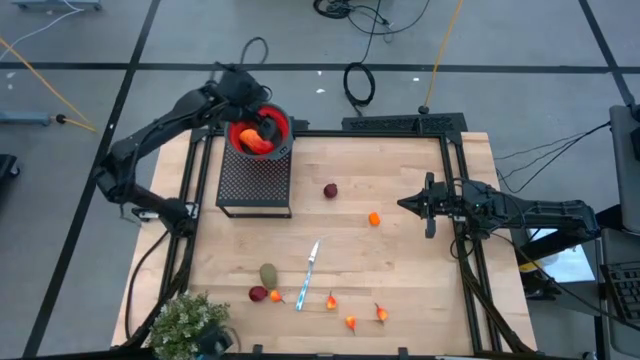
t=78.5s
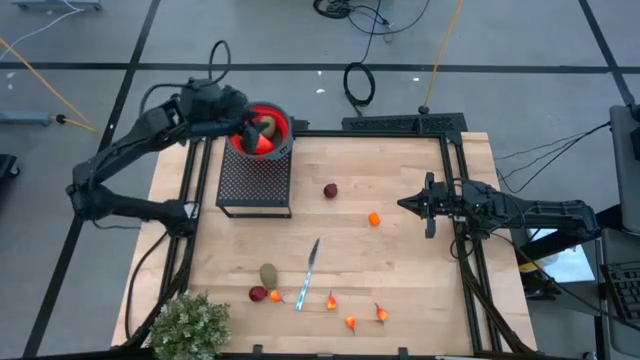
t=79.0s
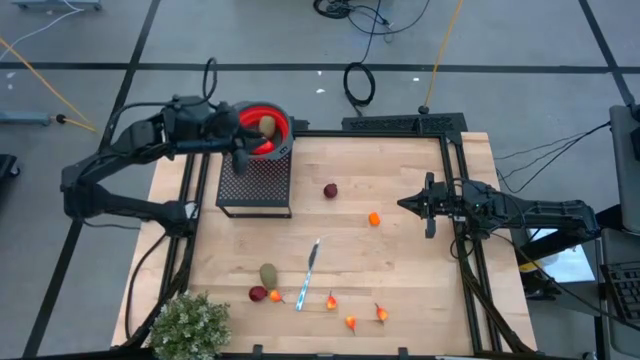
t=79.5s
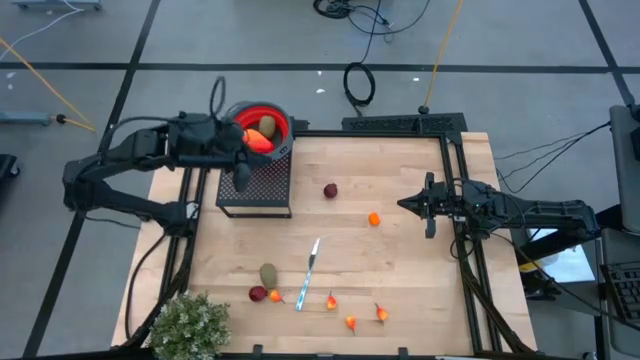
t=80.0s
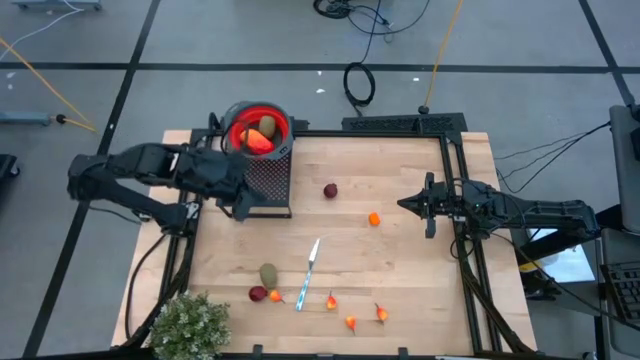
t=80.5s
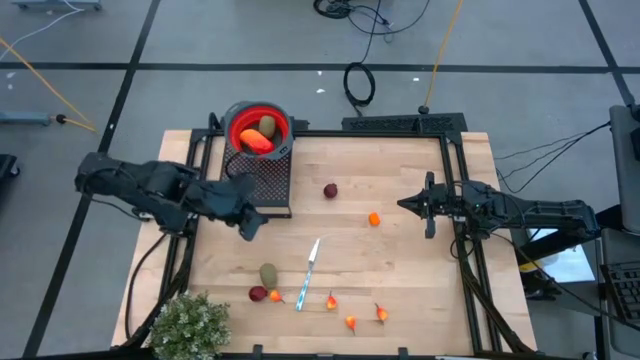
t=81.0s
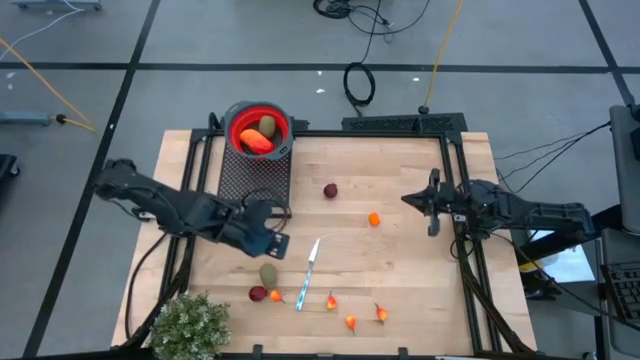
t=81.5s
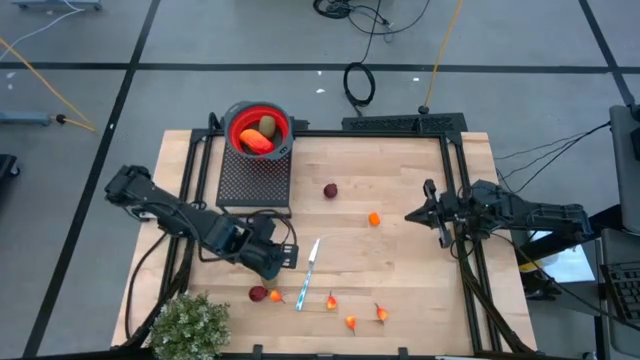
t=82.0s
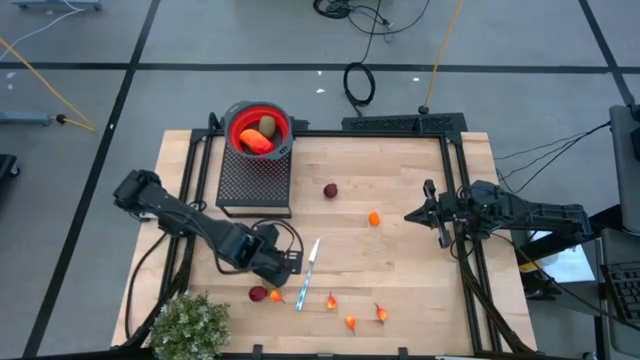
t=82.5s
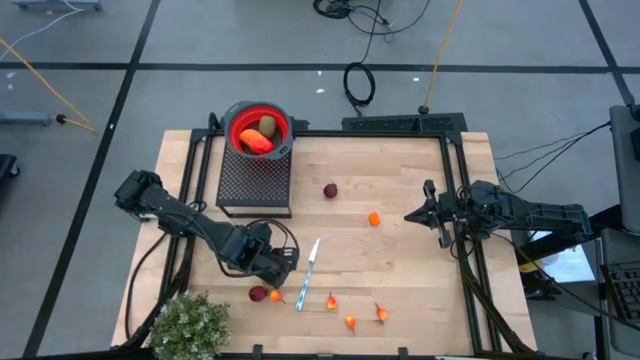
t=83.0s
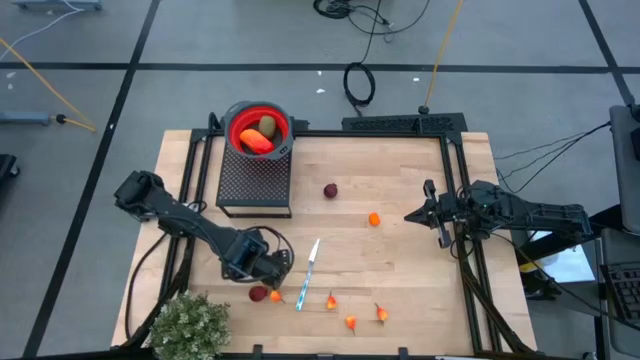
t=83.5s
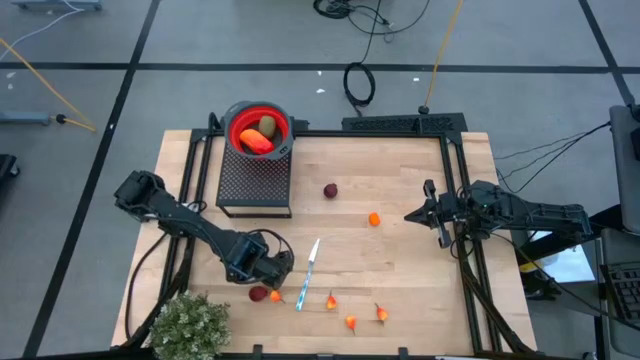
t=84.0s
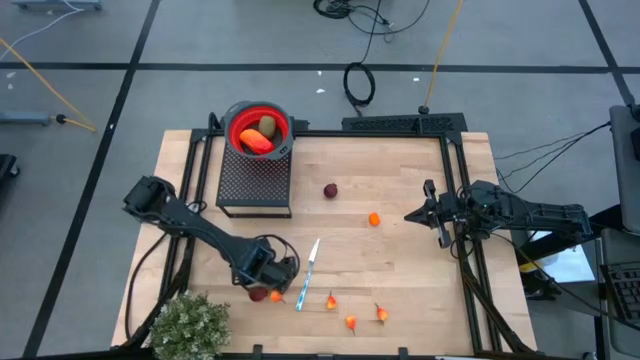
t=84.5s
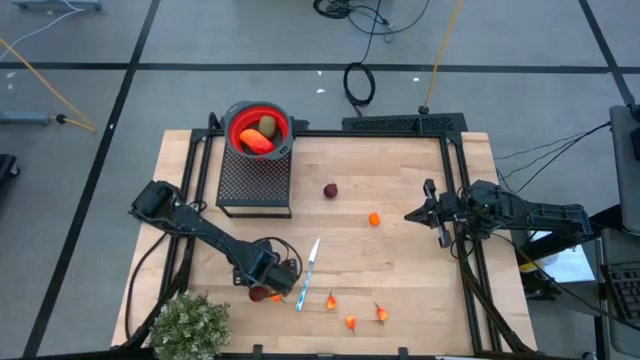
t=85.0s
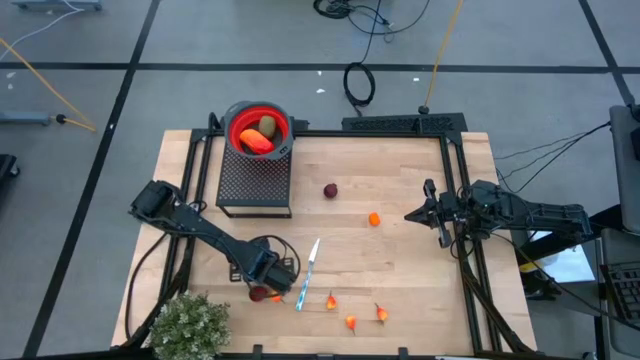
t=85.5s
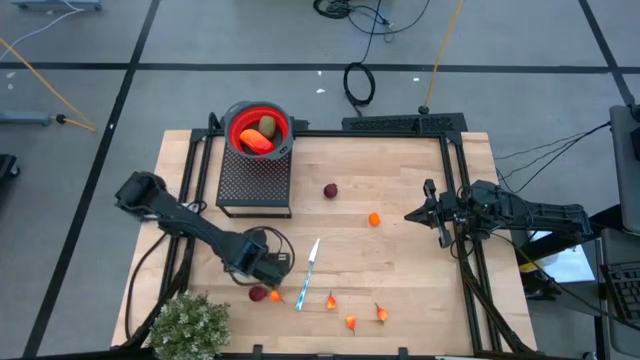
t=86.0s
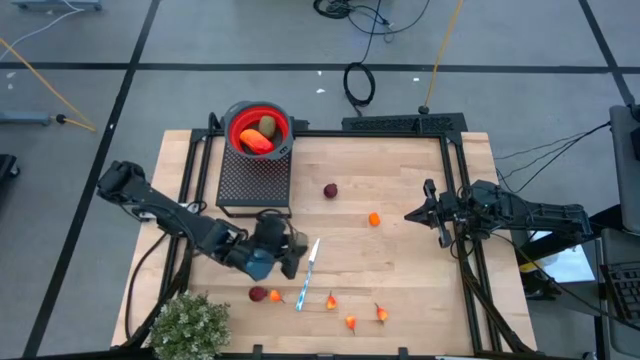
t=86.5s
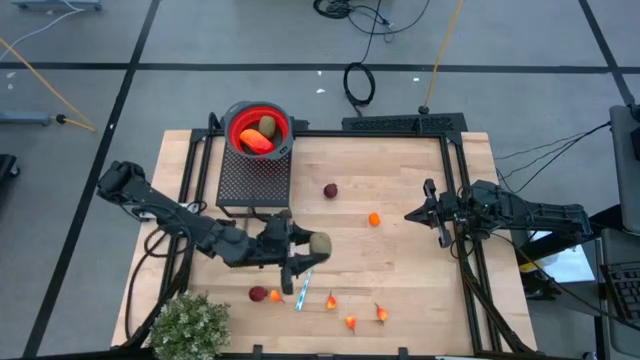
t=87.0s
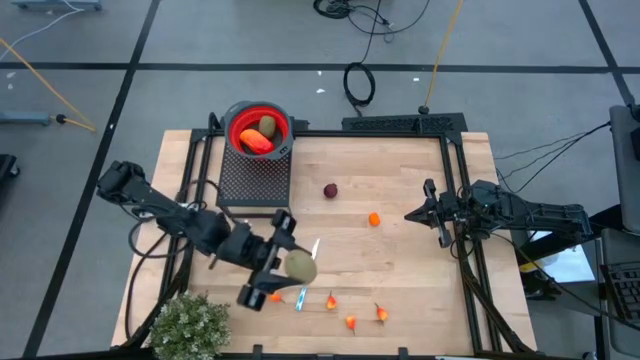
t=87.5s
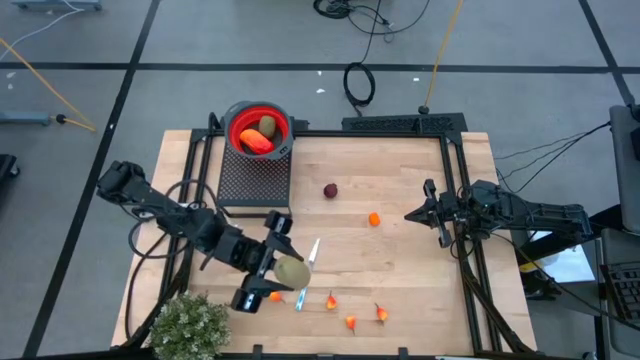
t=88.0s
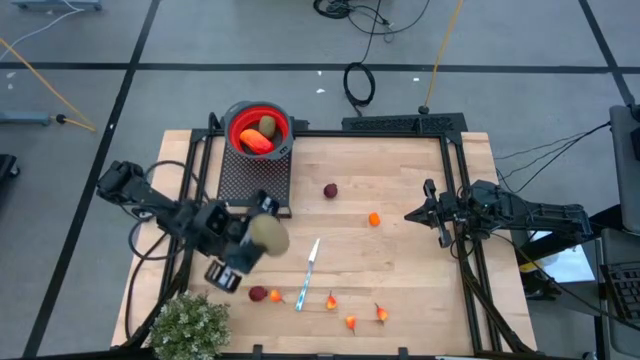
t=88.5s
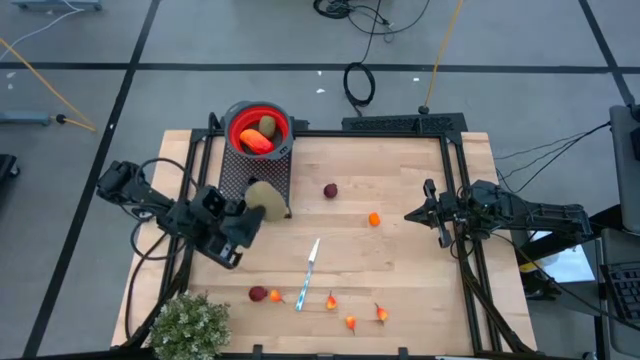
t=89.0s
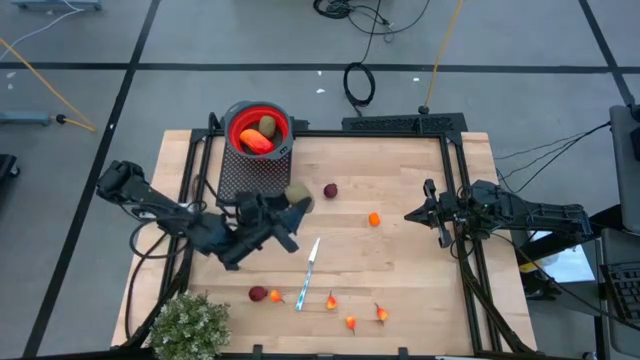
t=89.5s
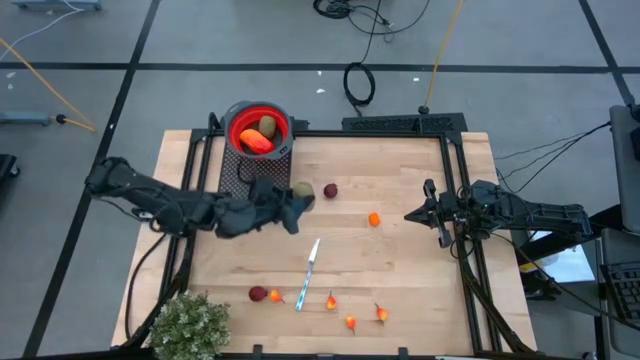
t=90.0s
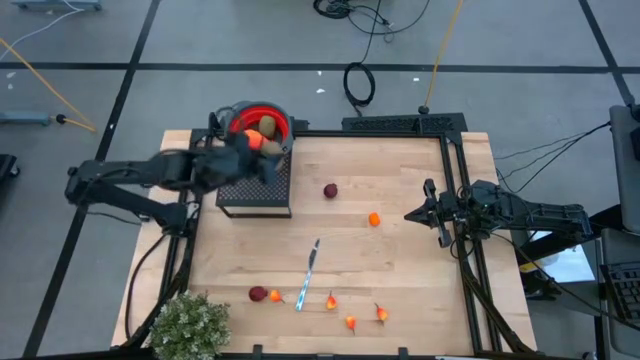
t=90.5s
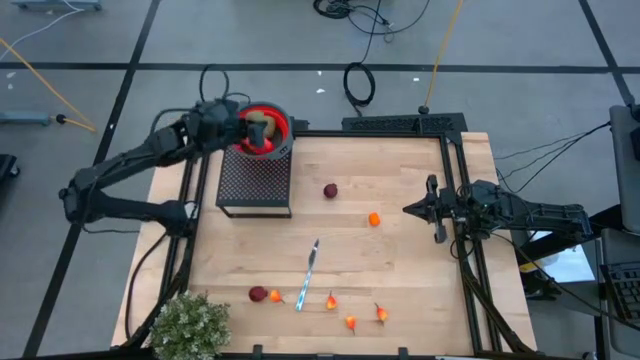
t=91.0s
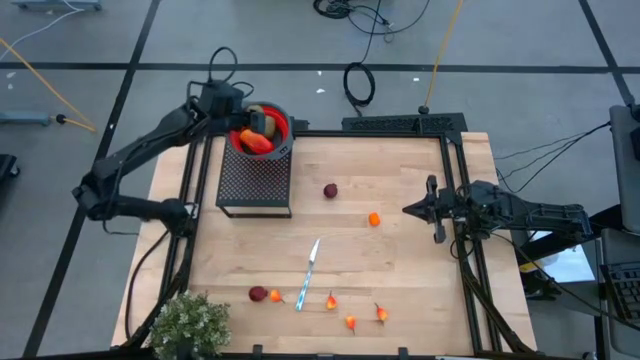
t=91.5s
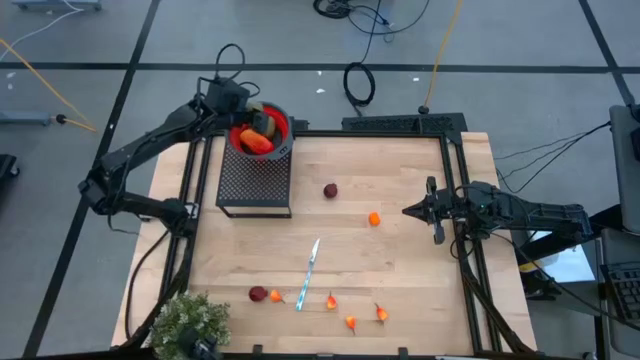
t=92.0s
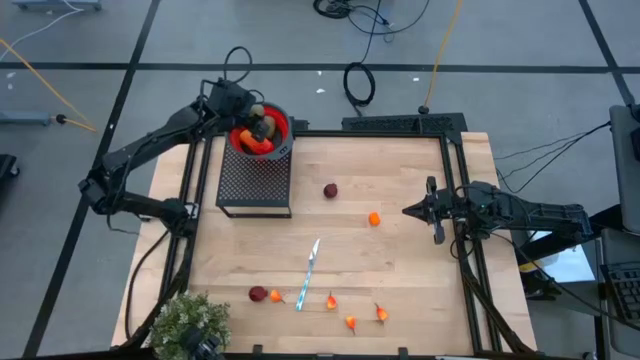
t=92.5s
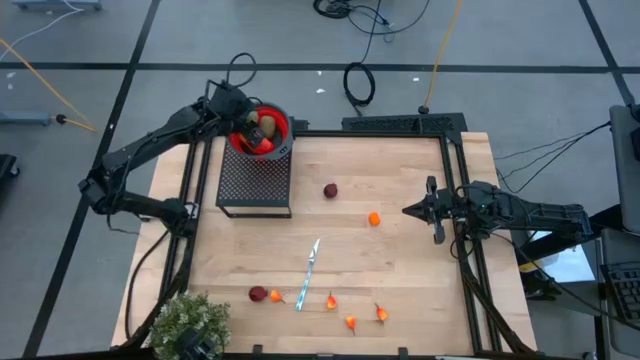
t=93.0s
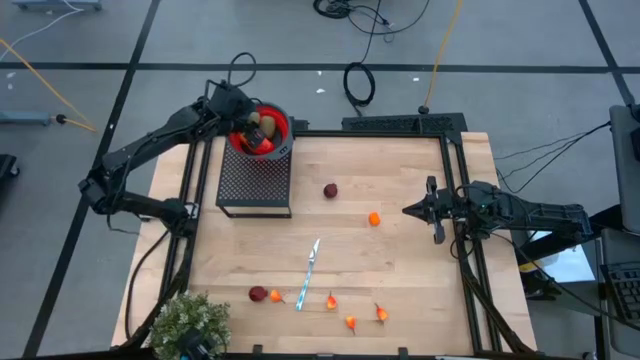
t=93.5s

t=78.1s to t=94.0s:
Task: Pick & Place Fruit
Put the green kiwi into the red strainer bowl on the shelf

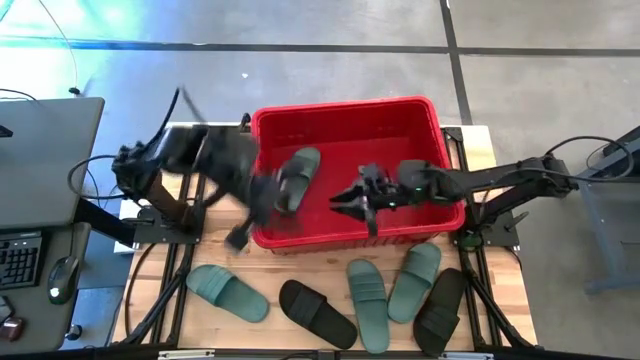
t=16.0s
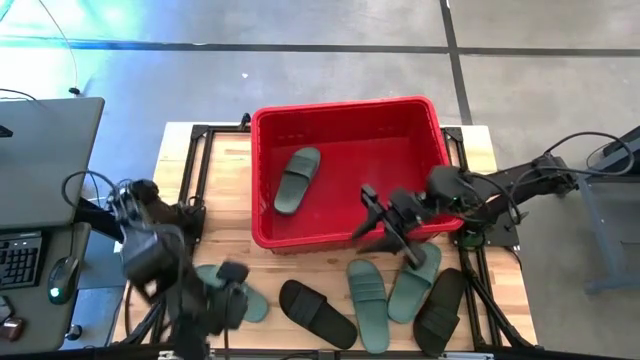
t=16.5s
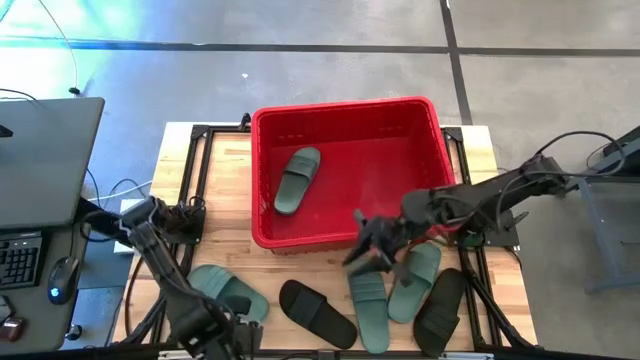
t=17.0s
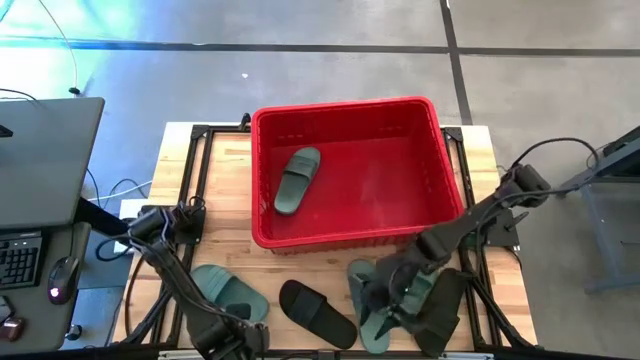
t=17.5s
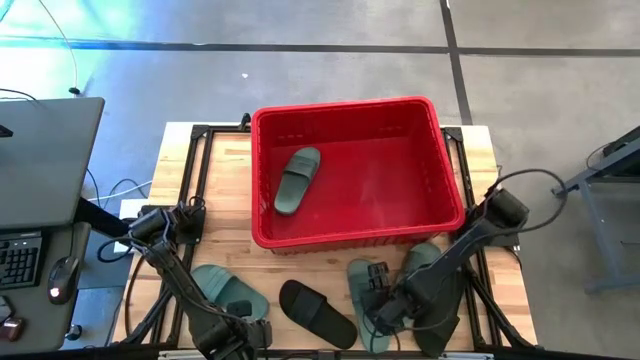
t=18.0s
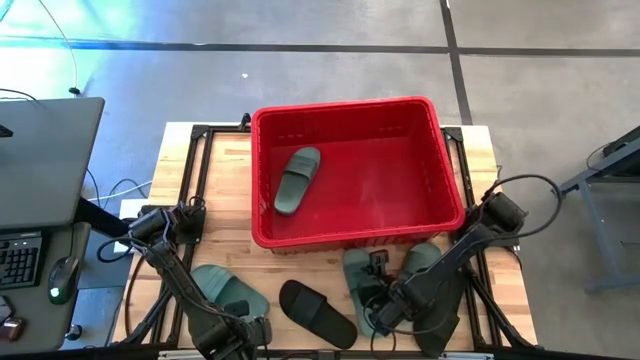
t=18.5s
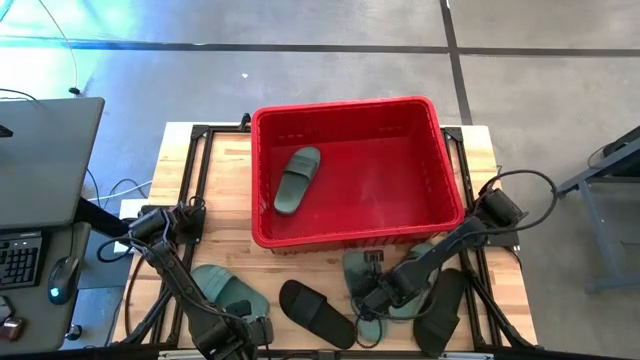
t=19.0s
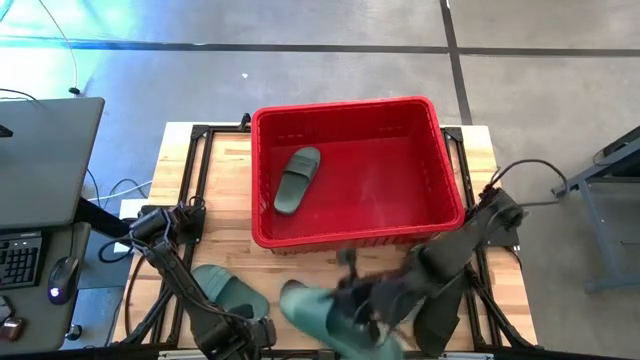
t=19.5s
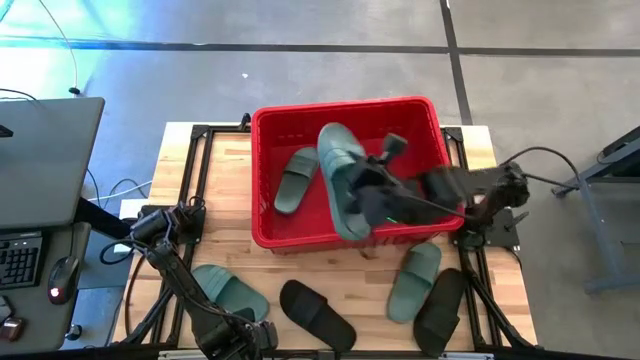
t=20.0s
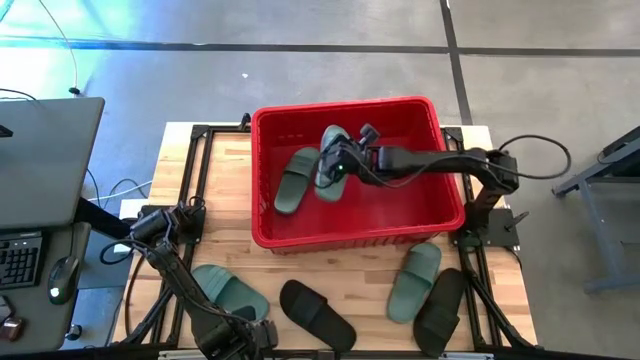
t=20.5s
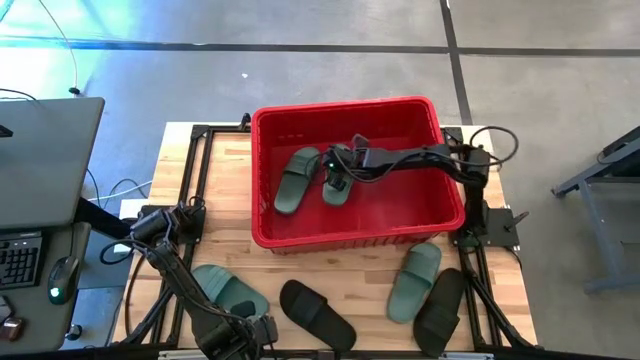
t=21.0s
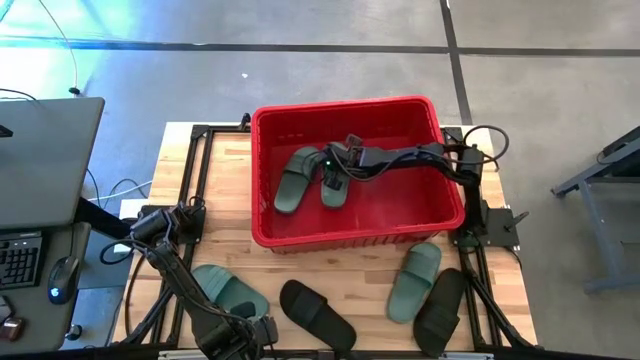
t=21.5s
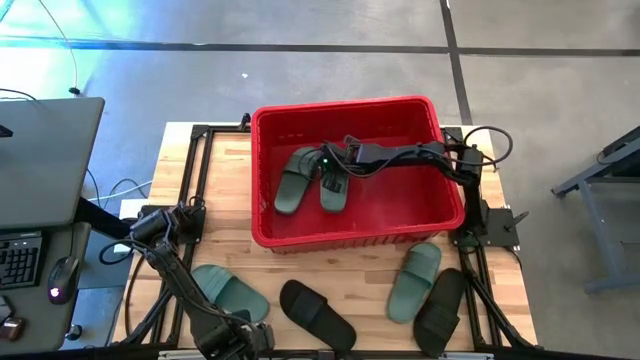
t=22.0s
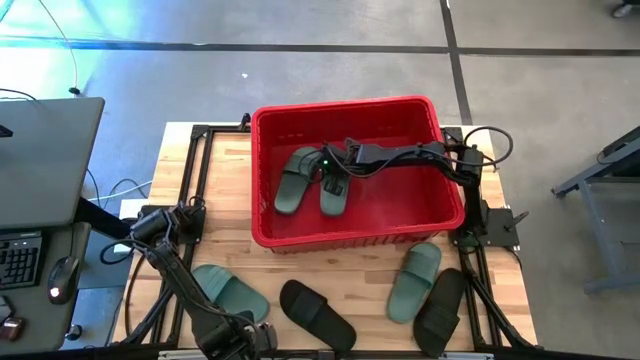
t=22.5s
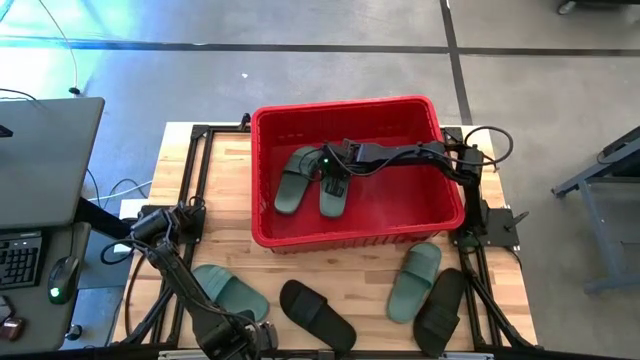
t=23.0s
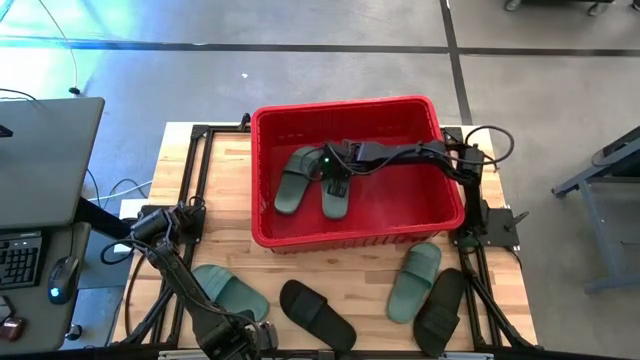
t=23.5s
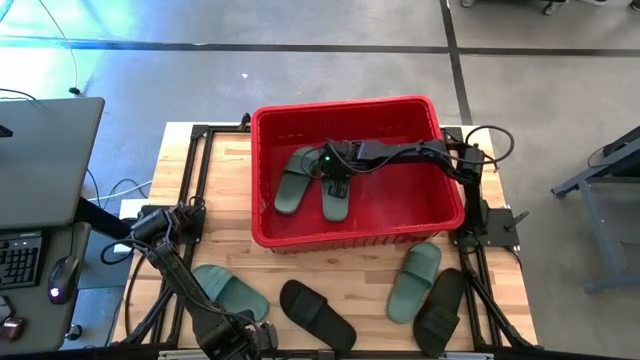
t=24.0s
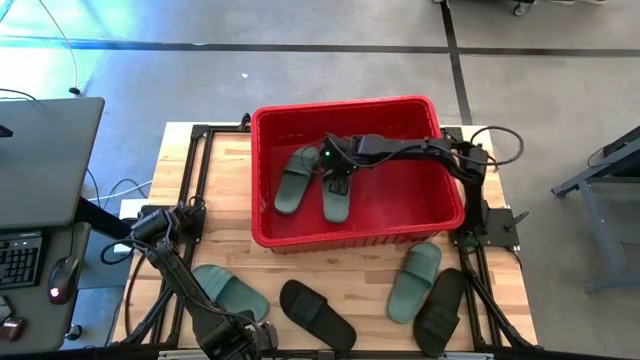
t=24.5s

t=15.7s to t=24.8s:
Task: Pick and place slides into bin
Put the green slipper into the red bin
